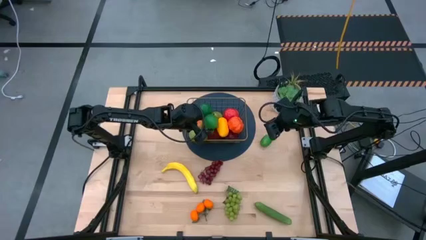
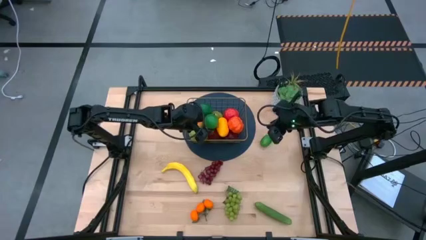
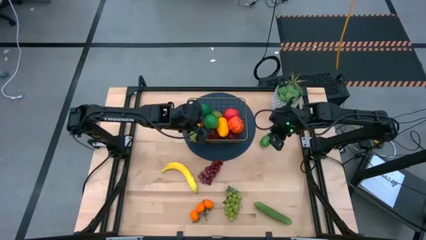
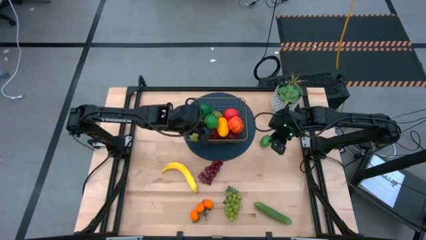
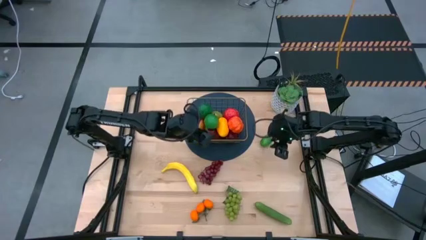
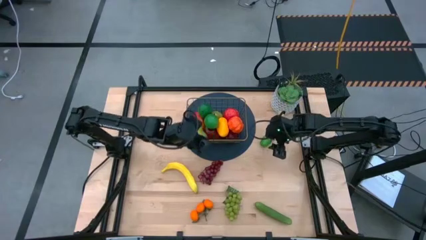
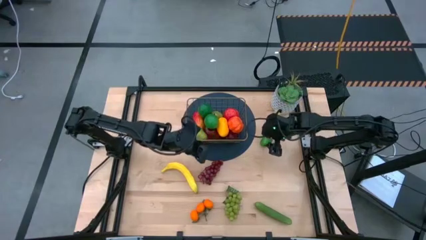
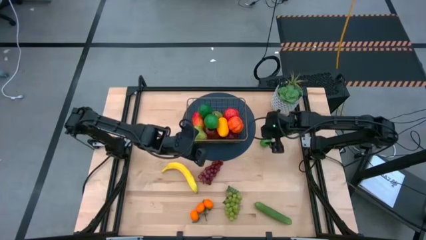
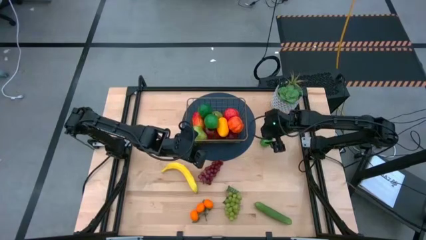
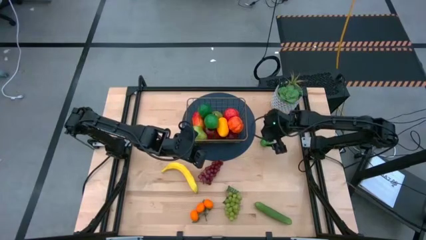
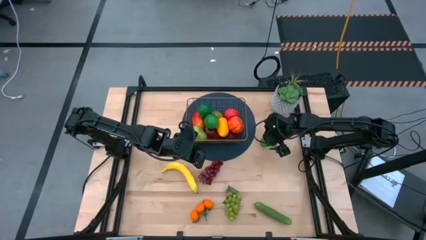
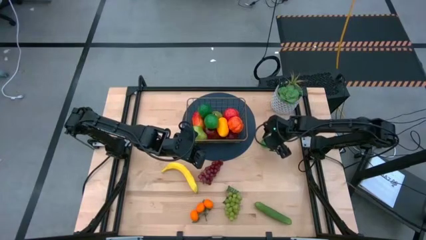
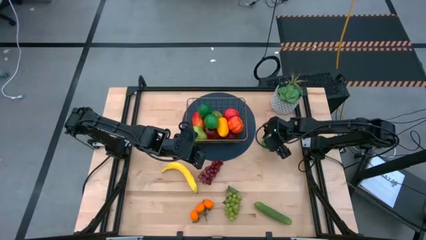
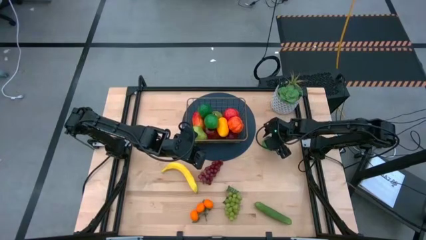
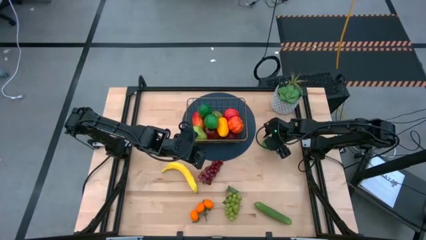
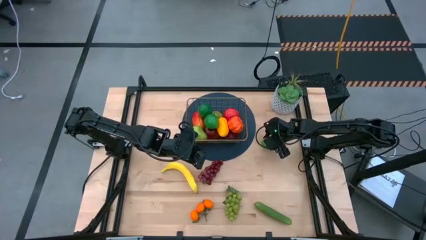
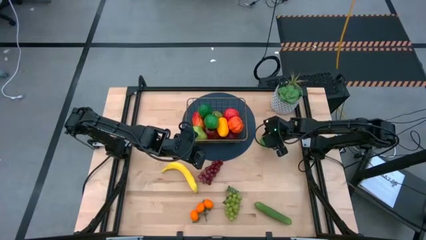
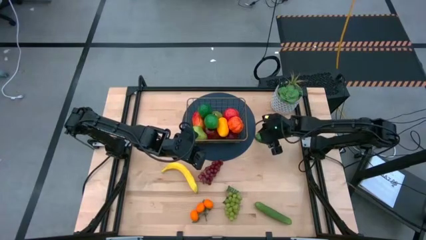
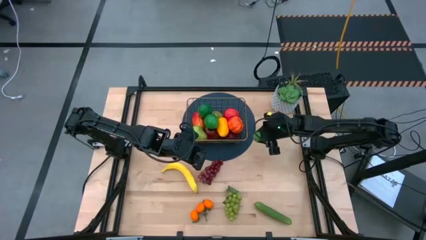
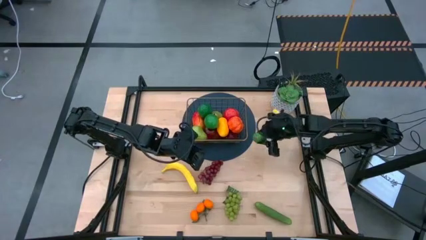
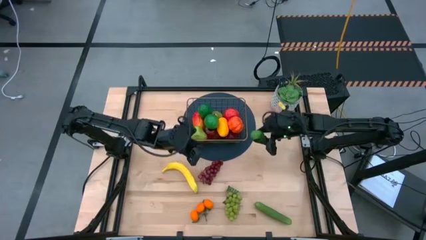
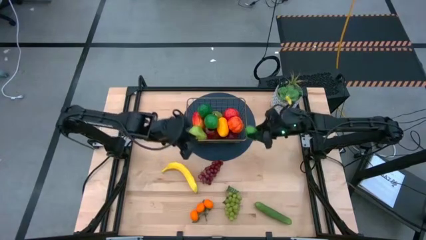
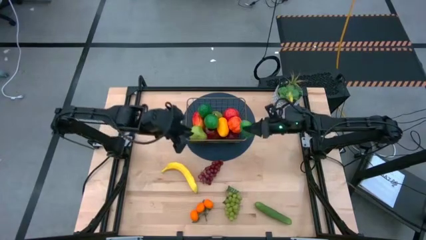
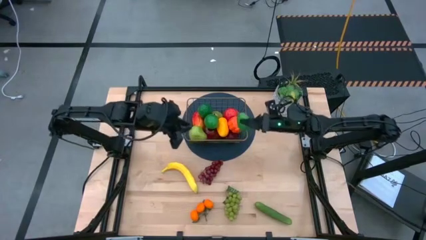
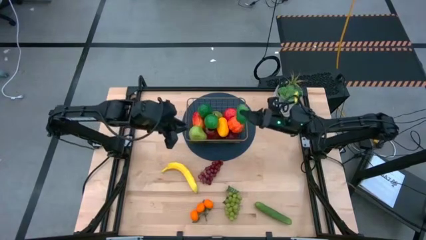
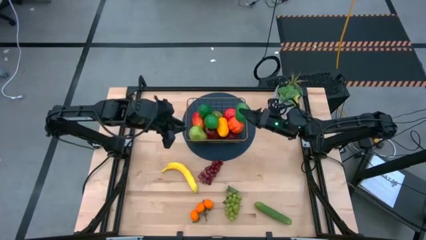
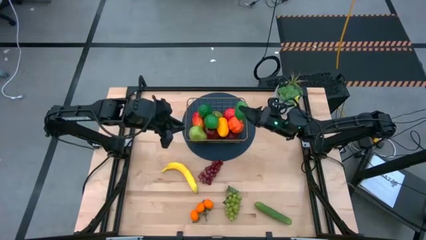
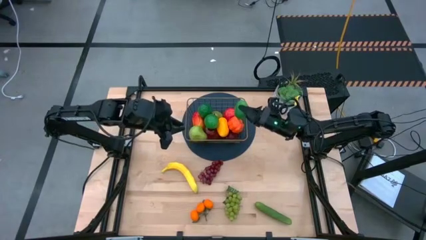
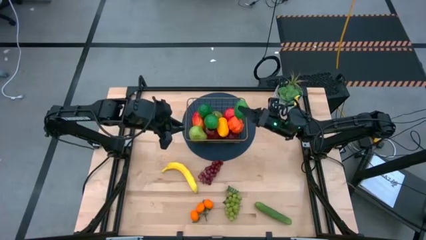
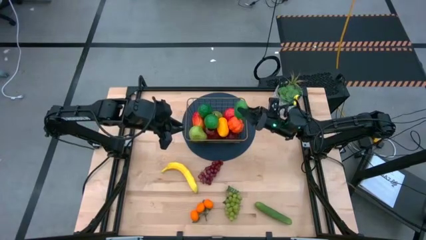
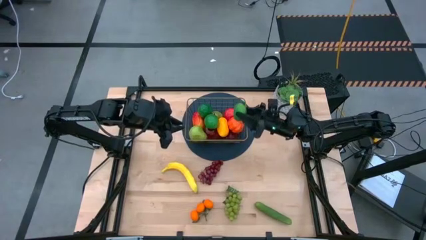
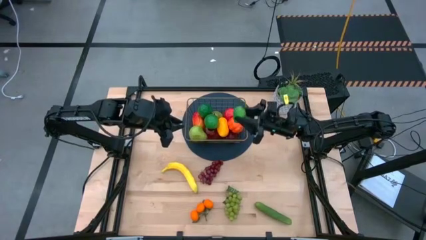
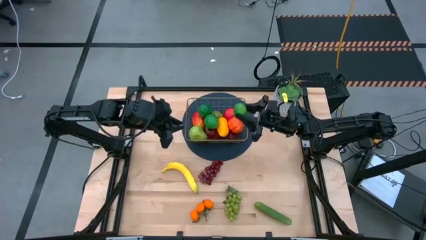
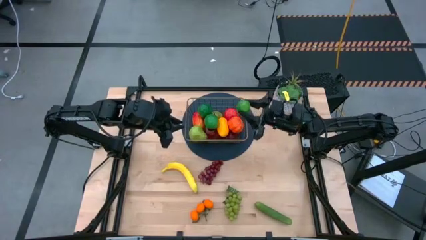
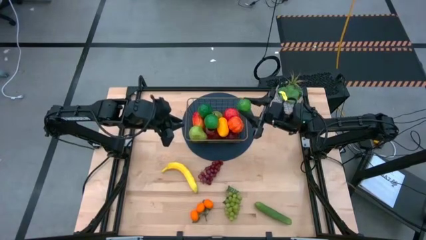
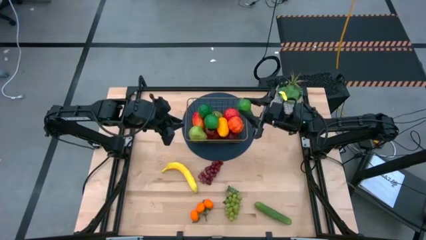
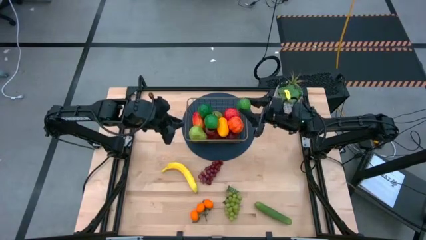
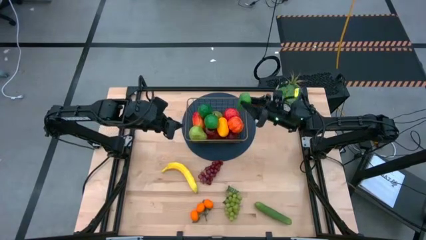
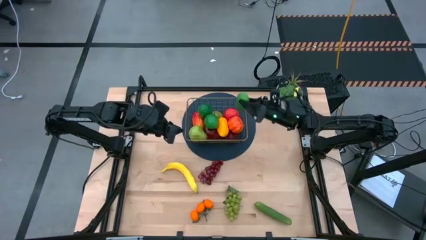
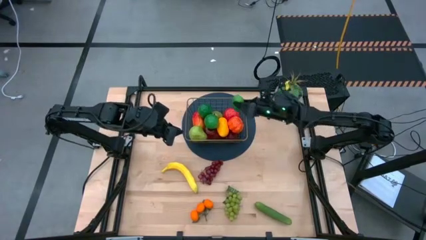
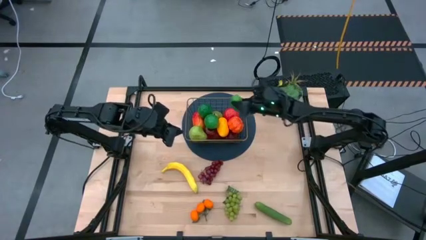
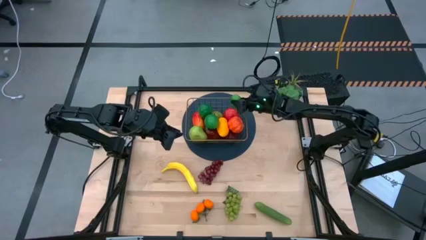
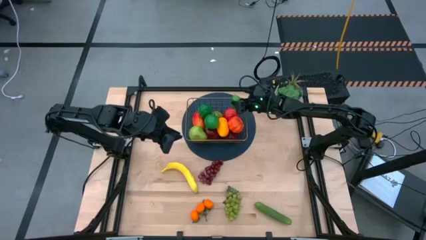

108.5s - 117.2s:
Task: Build produce basket
Put the green lime into the wire basket

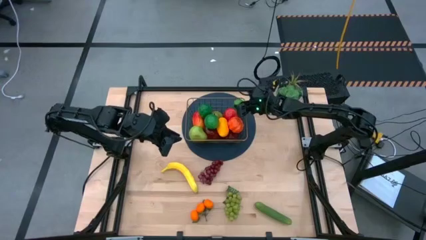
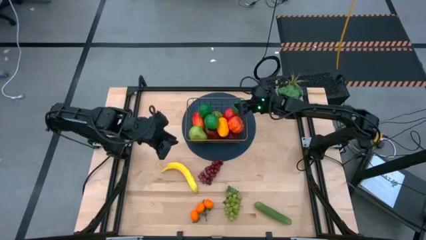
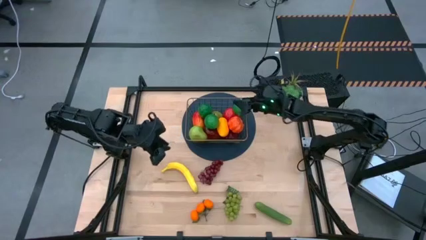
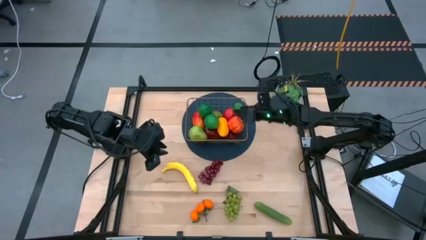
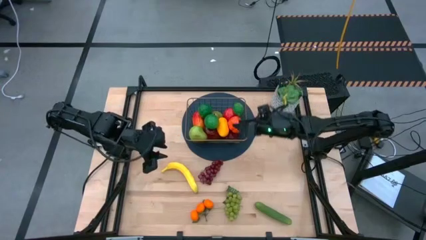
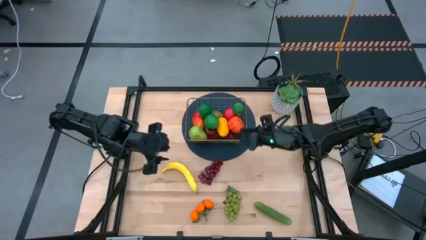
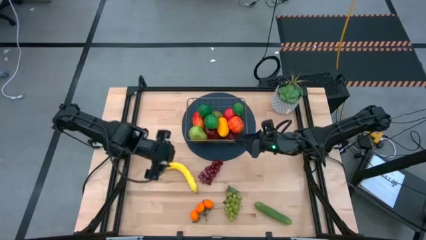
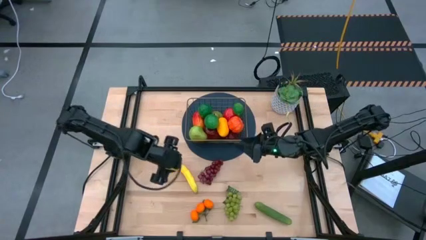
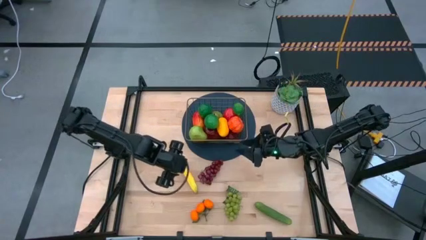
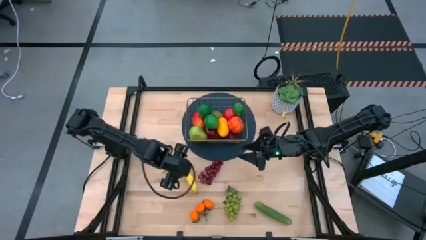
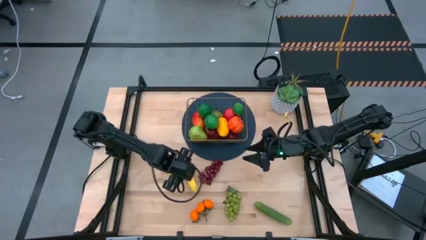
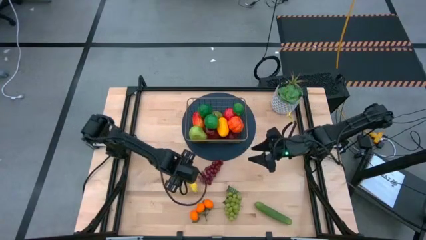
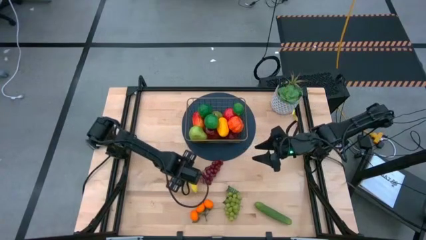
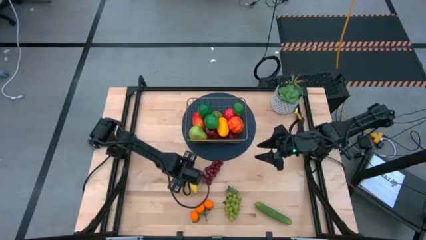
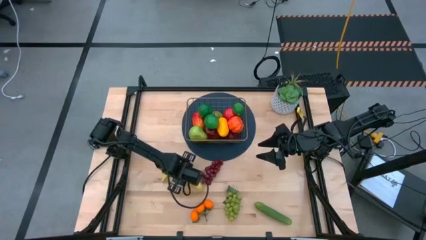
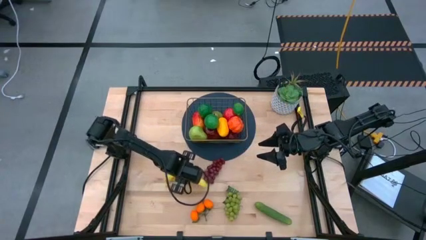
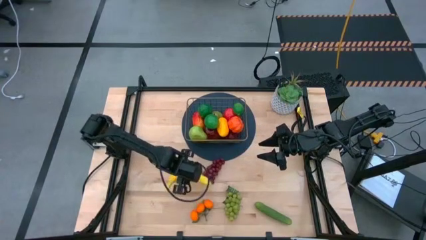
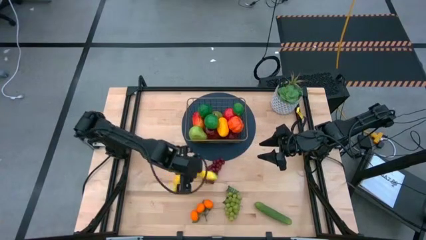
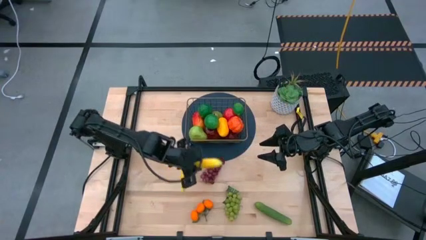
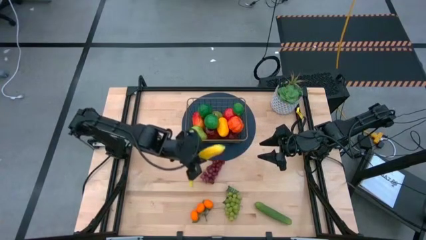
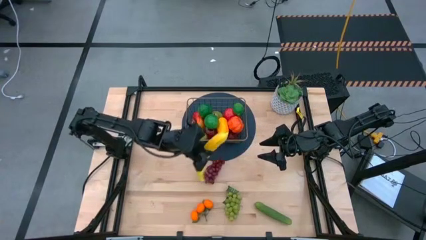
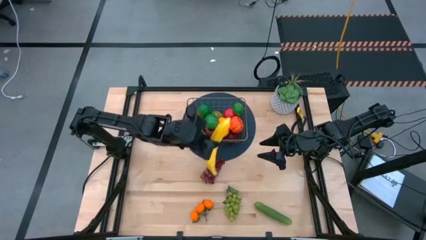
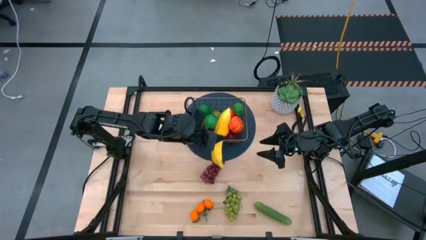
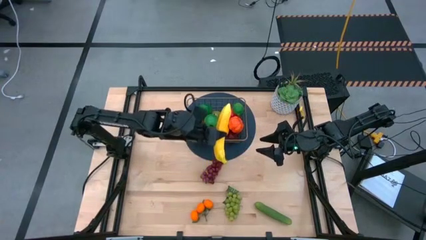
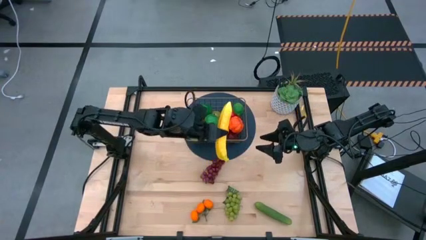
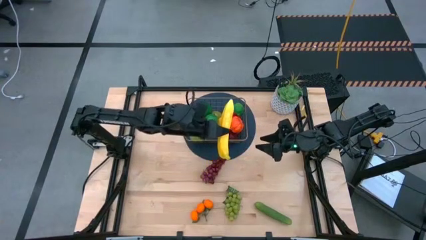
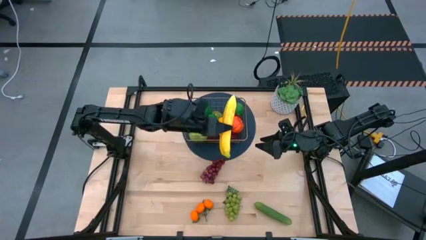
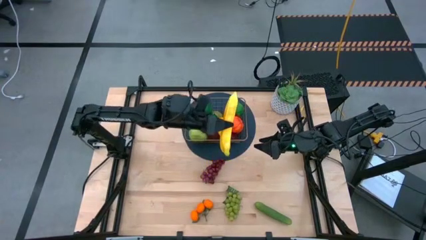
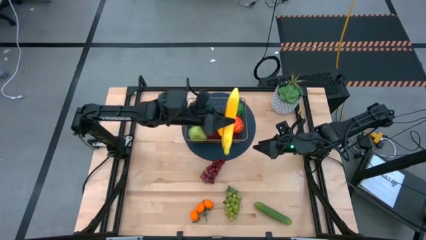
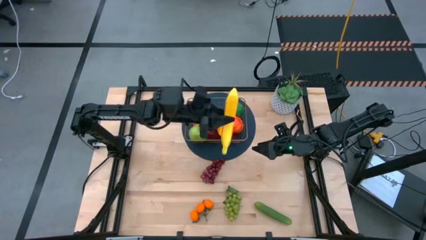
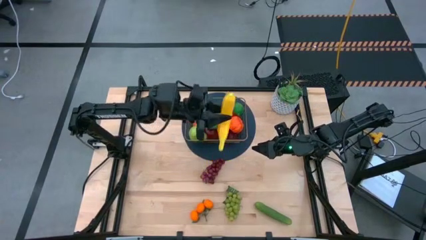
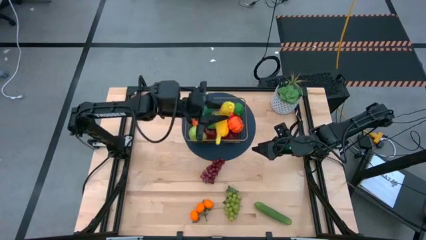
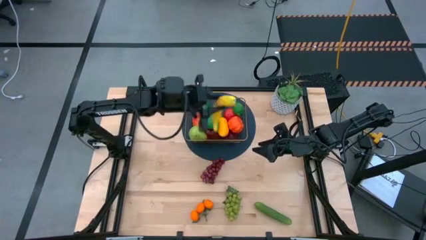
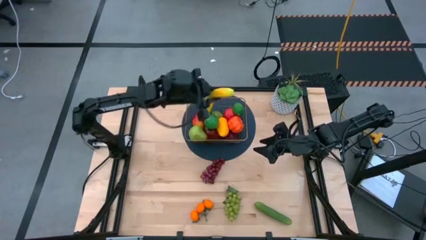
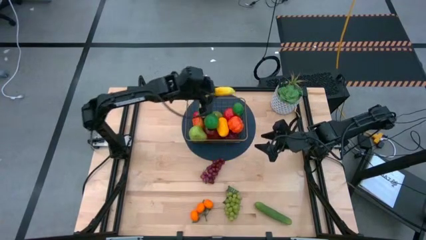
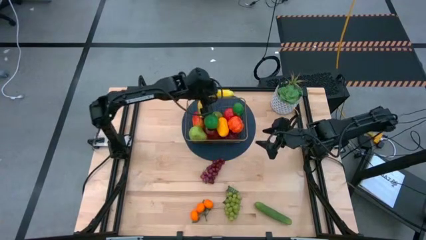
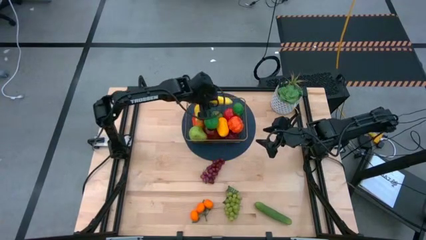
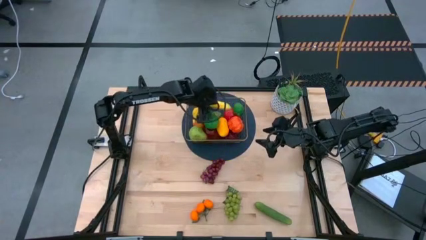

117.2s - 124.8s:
Put the yellow banana into the wire basket

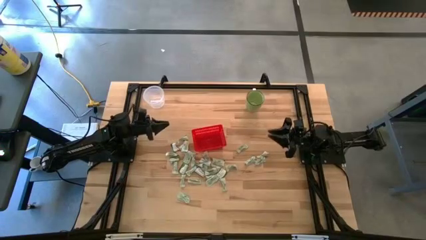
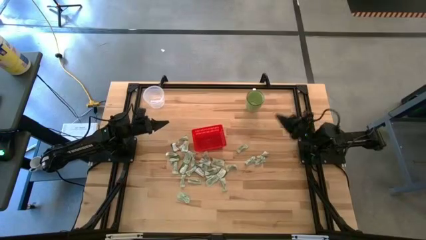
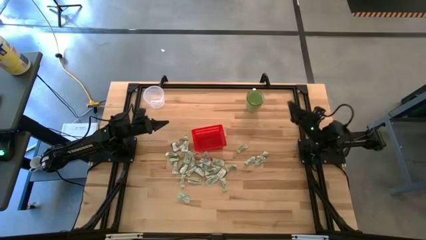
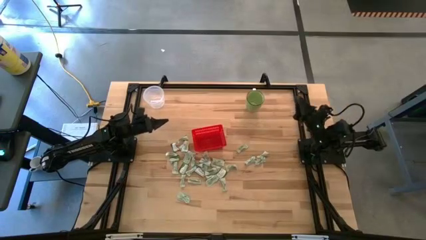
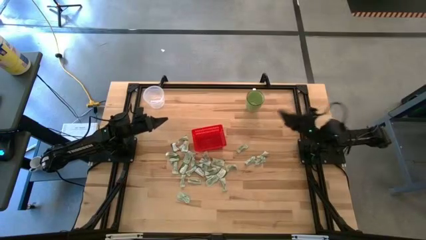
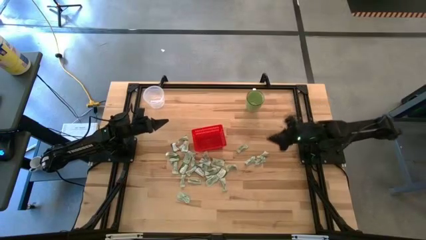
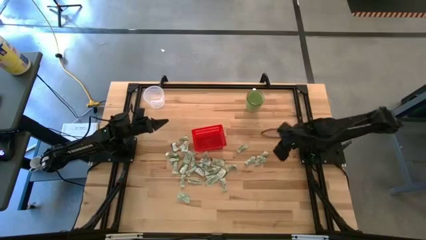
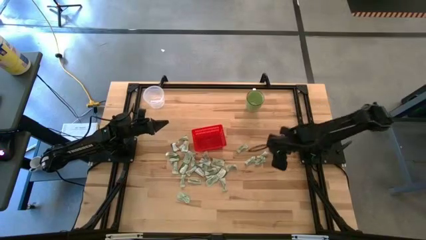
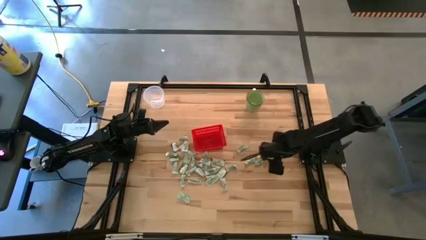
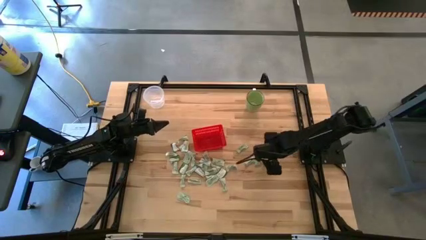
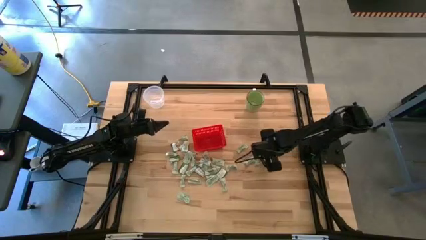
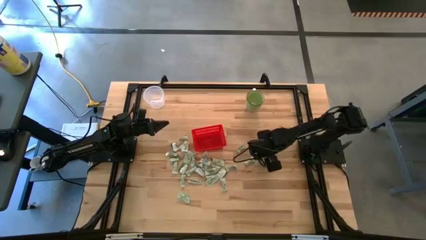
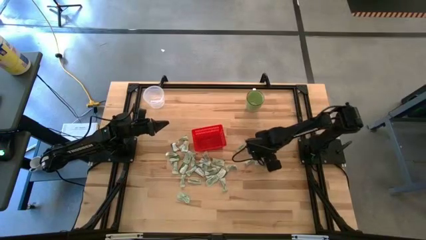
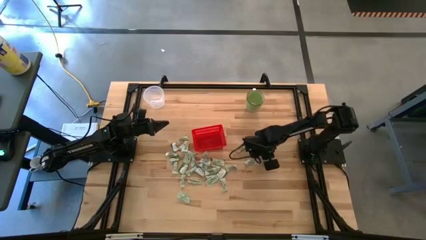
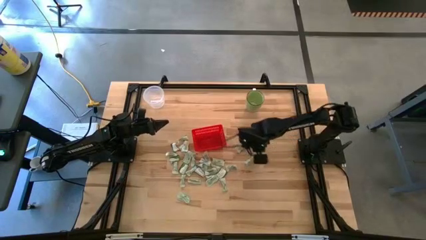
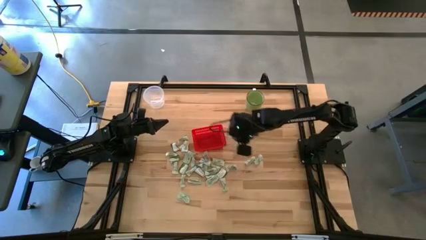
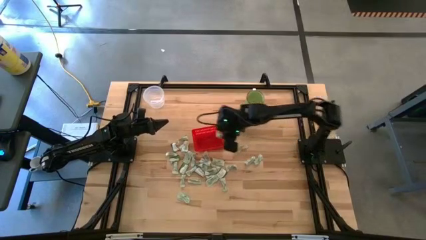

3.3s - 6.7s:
Task: Pick and place Stevia / Truvia into bins
Put the stevia packet into the red basket
